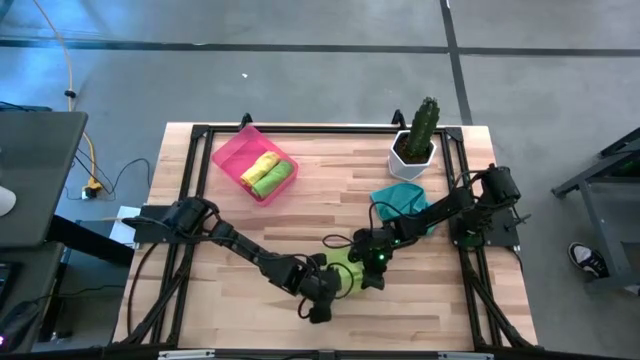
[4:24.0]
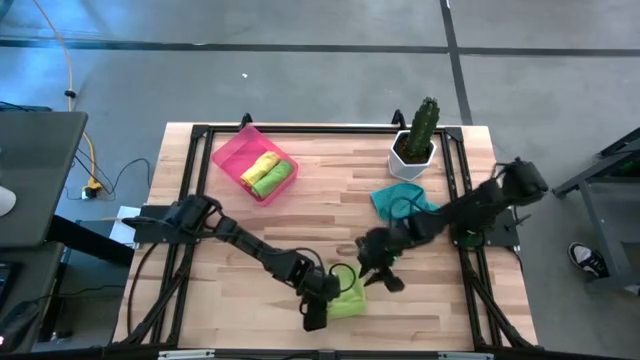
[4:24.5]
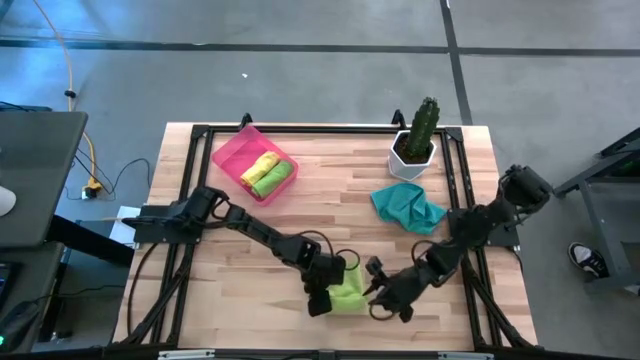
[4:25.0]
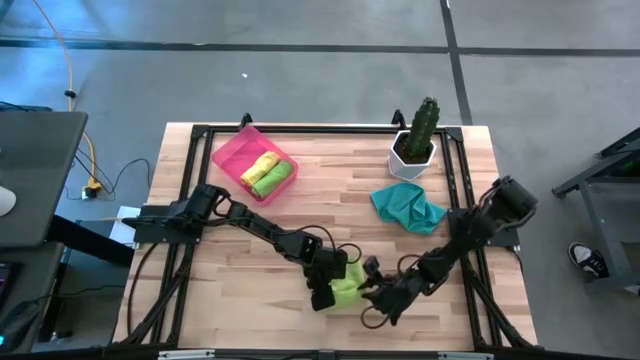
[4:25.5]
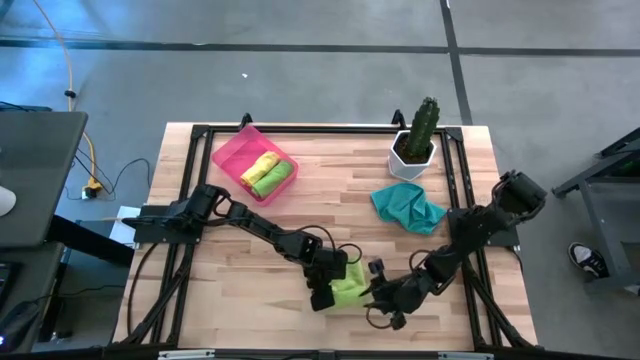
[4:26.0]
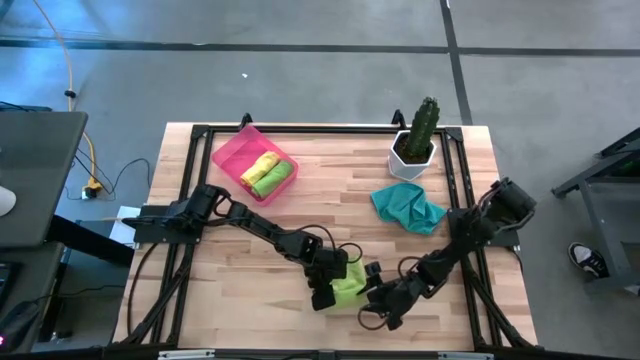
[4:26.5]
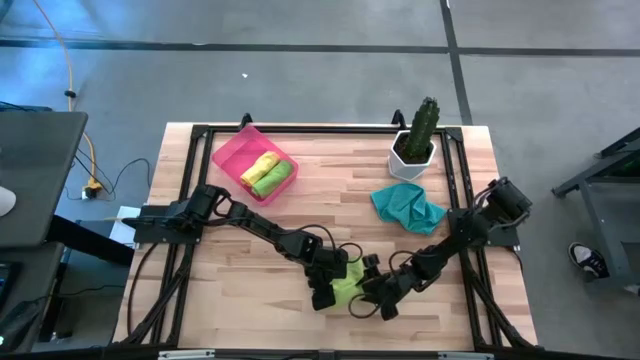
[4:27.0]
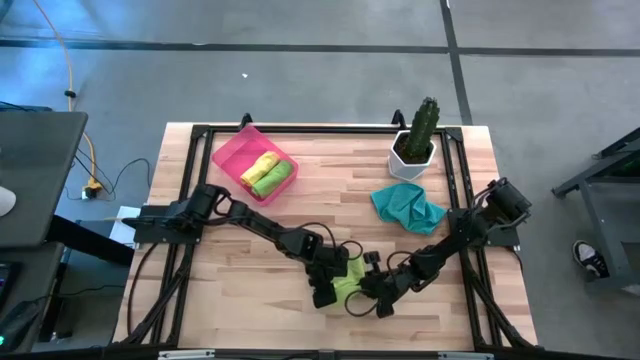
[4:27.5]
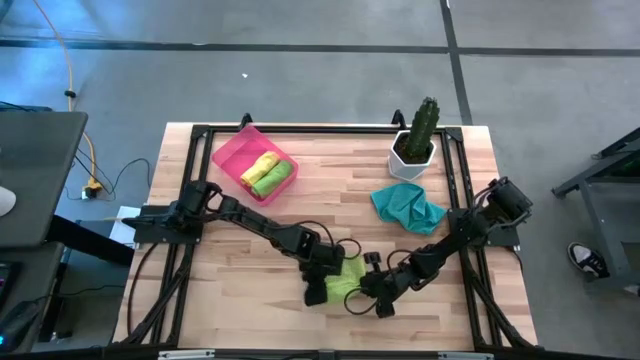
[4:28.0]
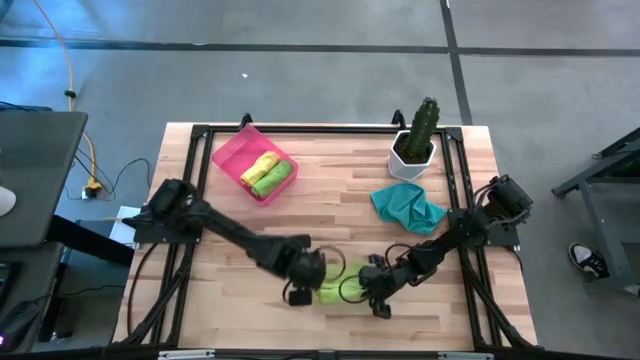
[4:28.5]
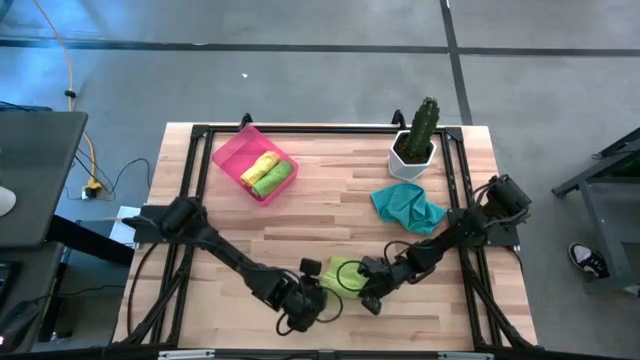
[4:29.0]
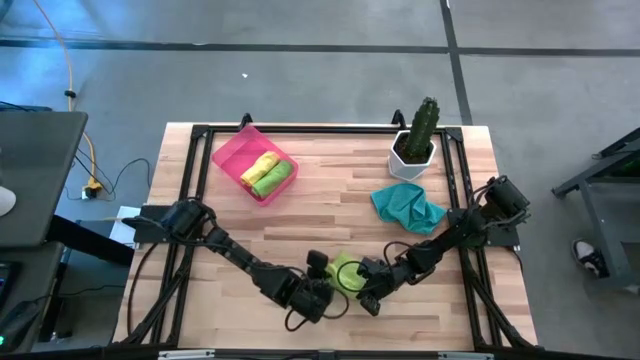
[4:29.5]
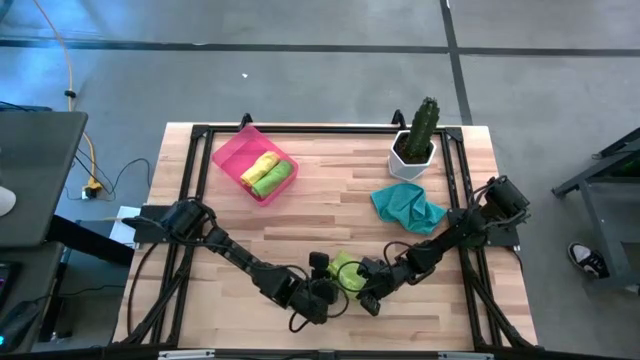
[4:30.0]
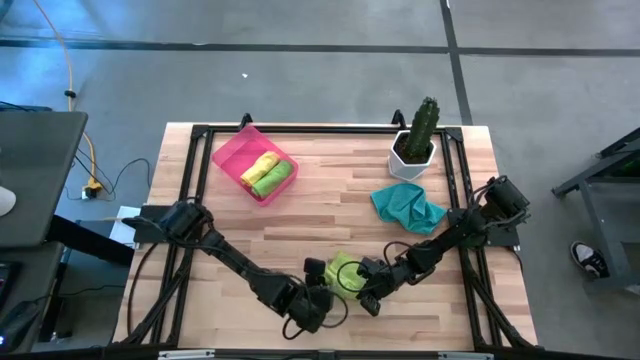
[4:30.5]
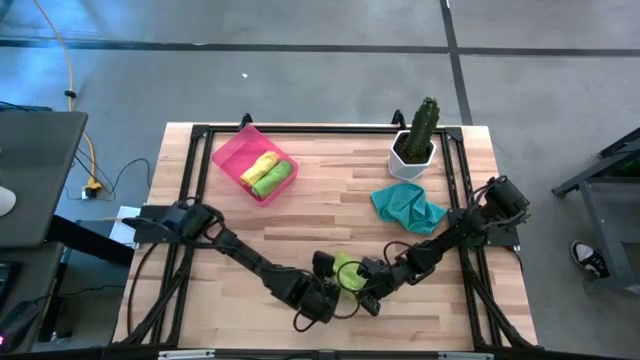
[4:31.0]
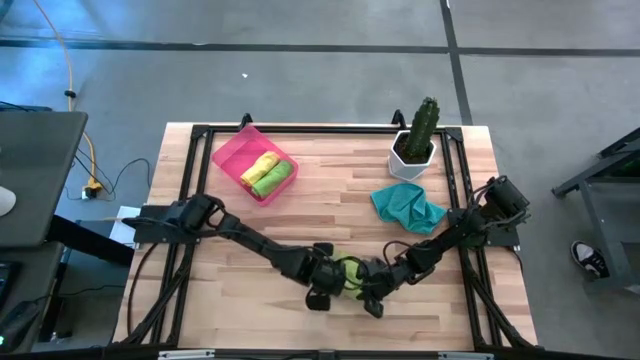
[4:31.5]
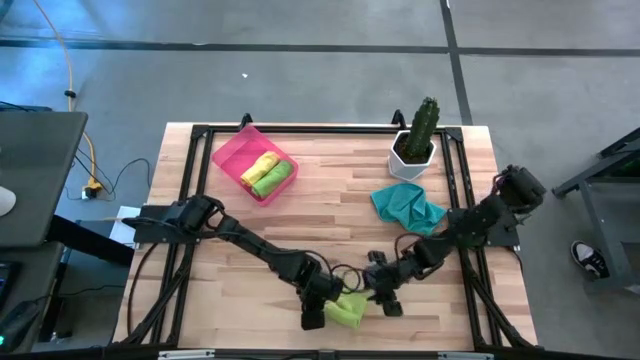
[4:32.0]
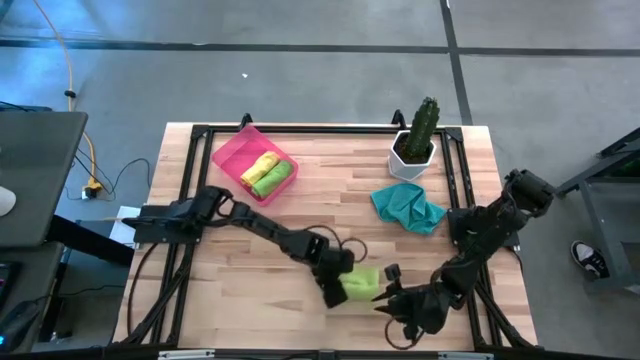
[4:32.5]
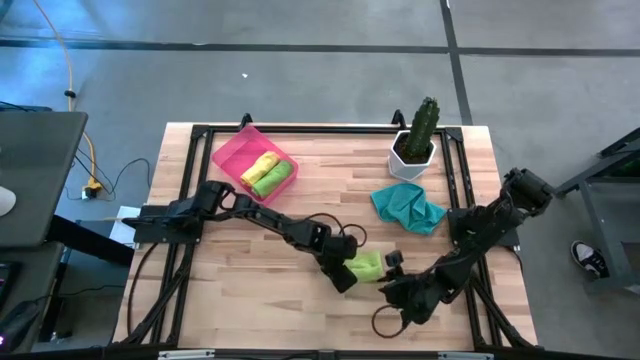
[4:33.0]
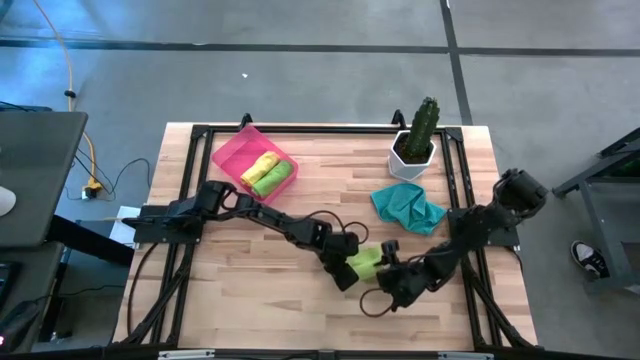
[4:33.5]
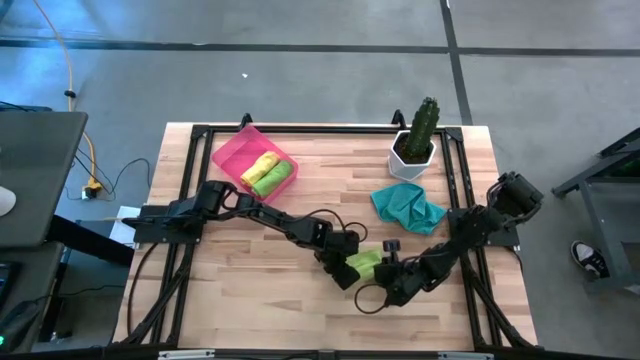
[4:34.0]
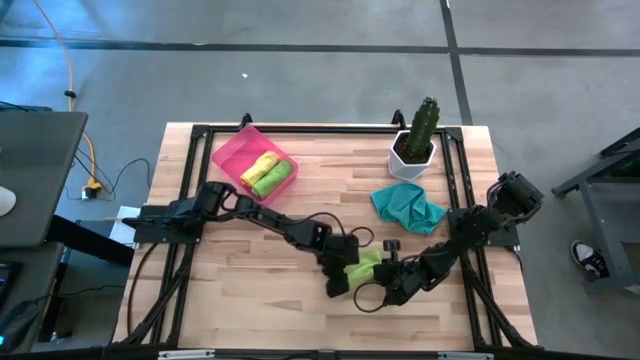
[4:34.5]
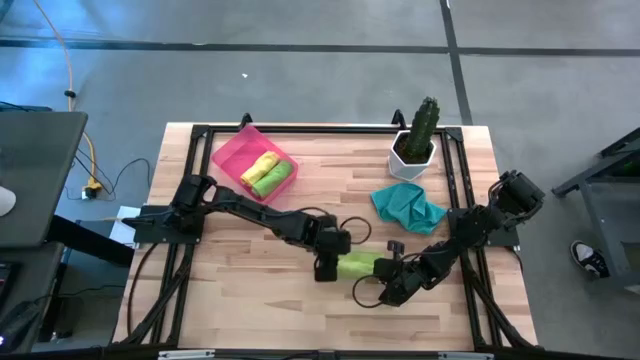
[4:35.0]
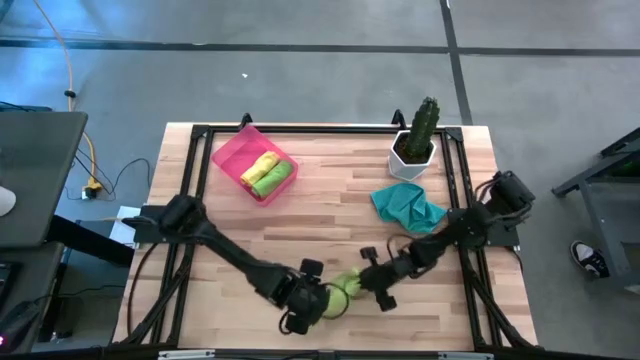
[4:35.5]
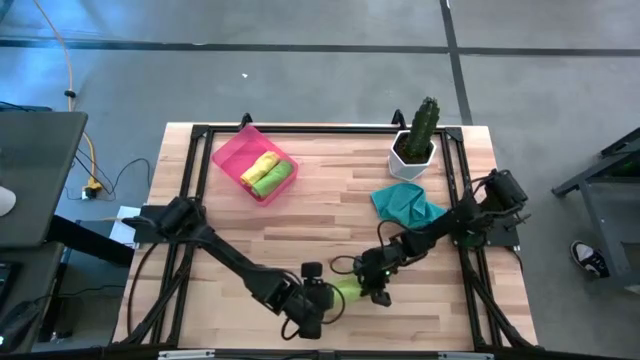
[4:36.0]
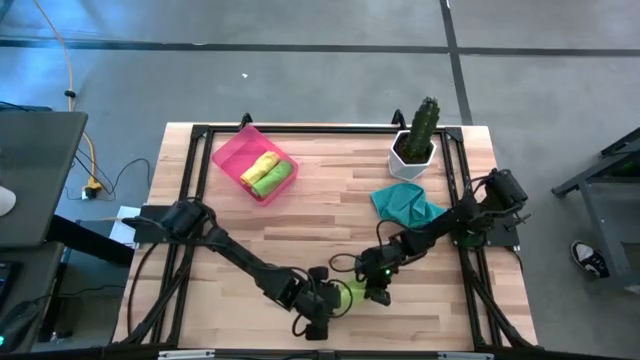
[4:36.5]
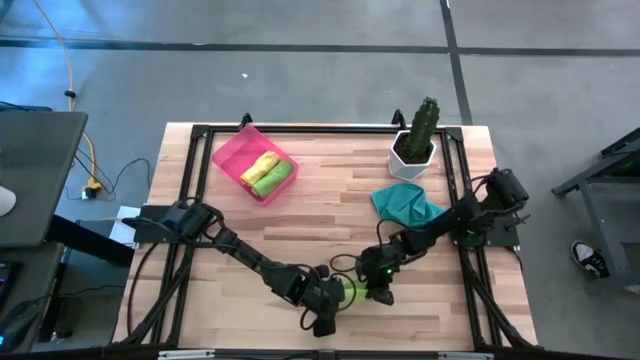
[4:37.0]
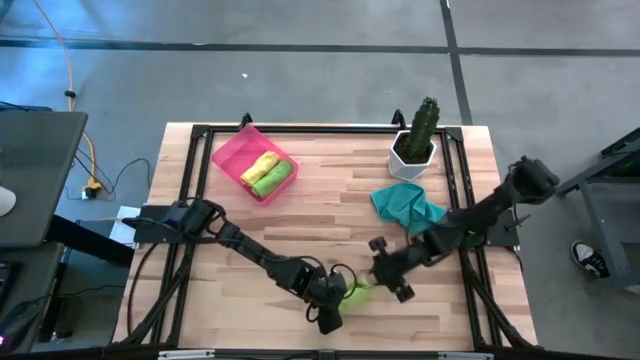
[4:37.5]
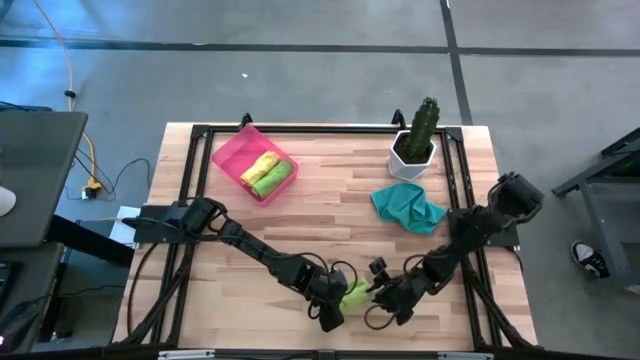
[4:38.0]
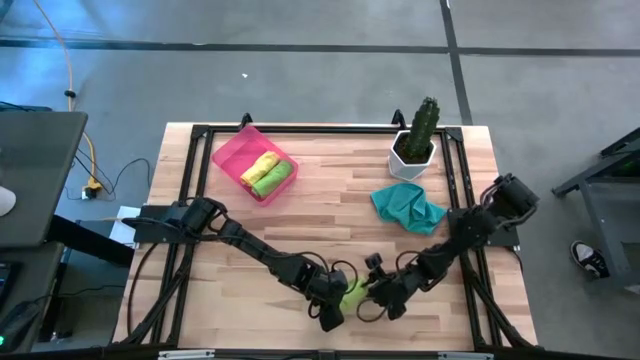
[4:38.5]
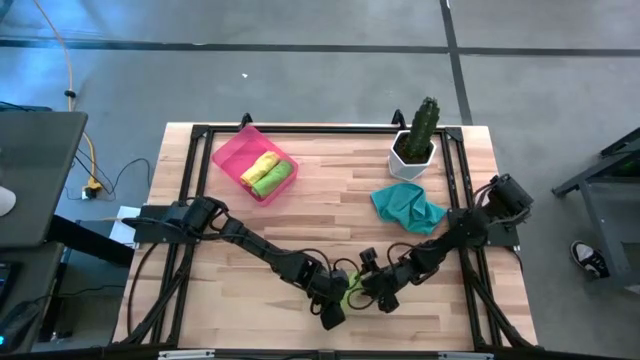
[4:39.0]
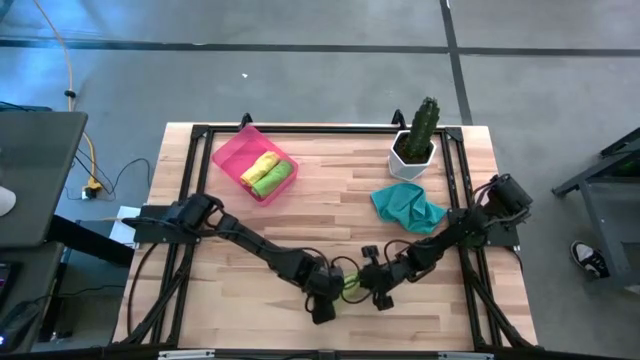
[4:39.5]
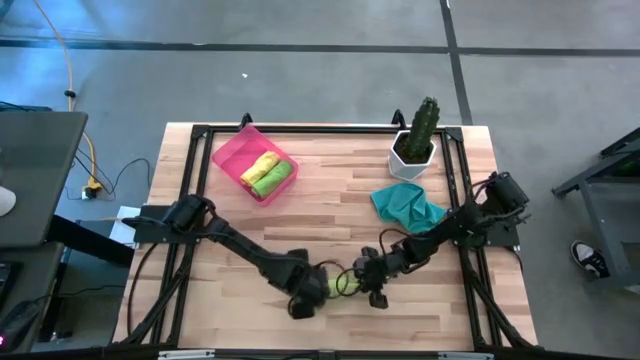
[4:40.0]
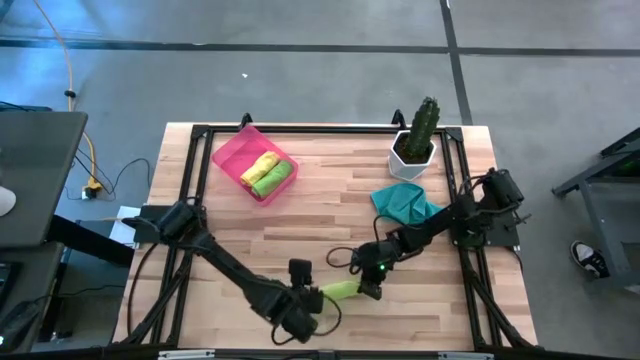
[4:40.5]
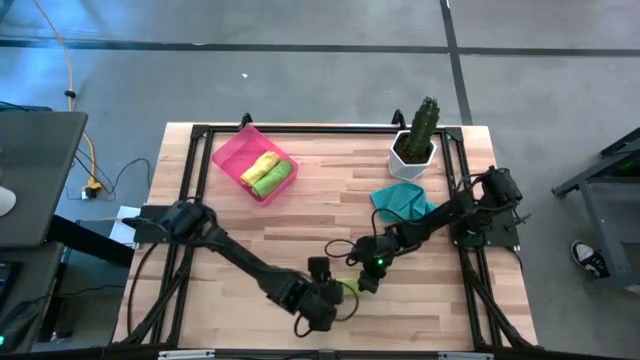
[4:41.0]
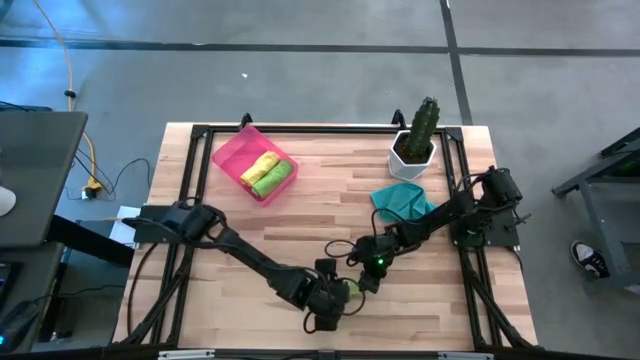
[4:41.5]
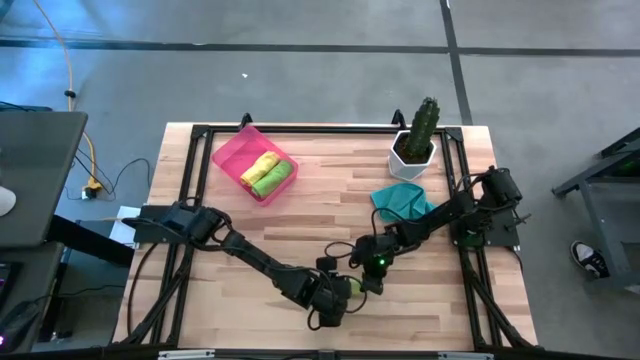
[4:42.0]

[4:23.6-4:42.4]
Task: Roll microfiber towels into tight, uniform cylinder then place into a basket
Roll the light green microfiber cloth

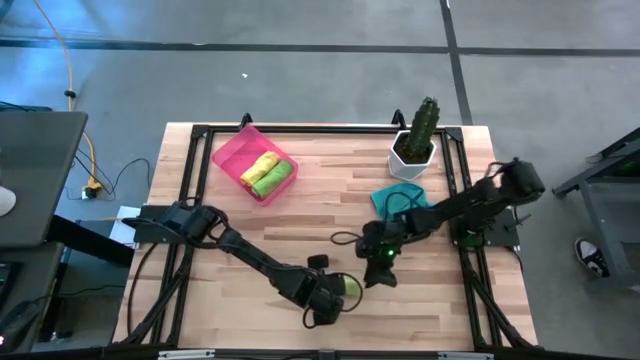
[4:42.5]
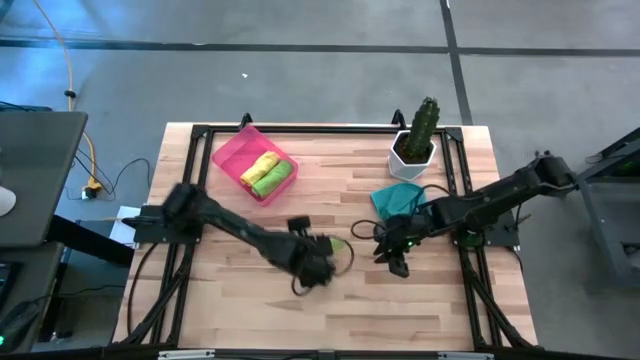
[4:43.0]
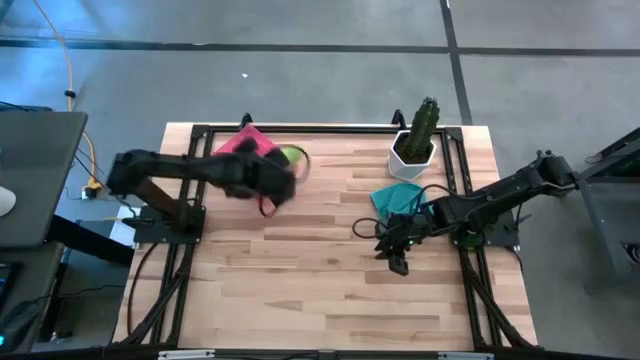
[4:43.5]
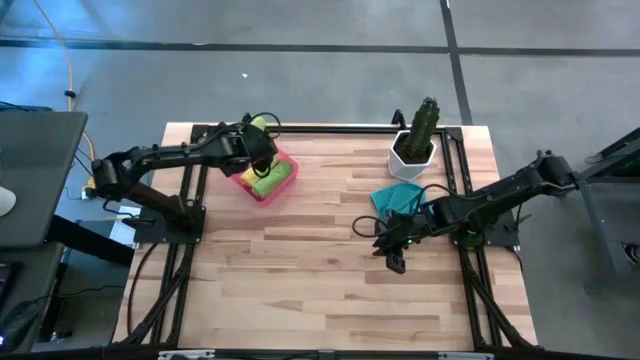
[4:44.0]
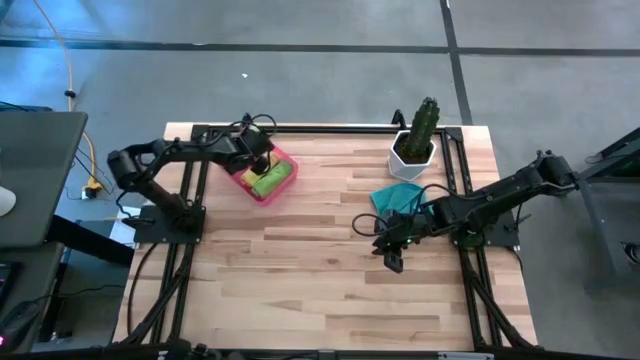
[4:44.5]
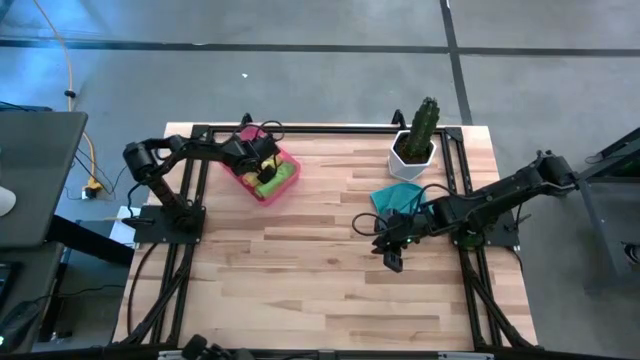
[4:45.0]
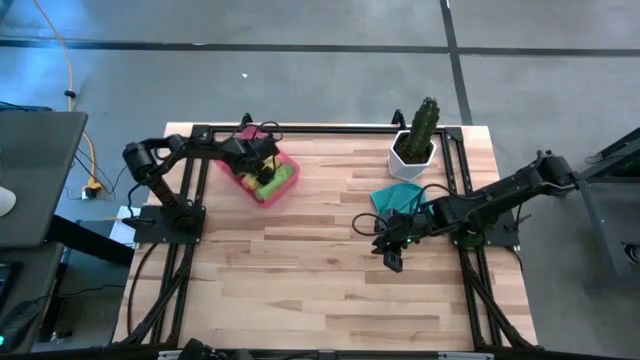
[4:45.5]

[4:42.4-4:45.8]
Put the rolled light green microfiber cloth into the pink bin

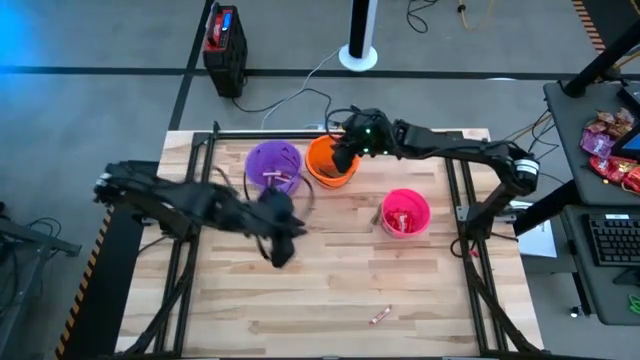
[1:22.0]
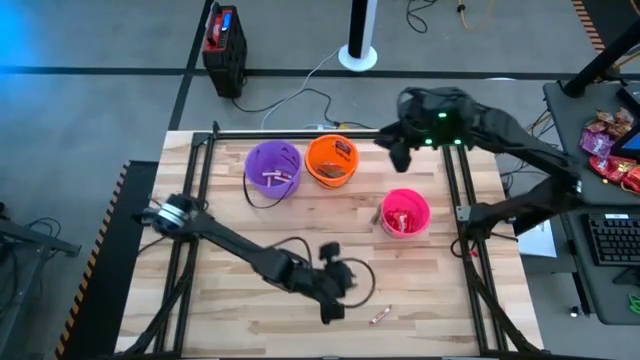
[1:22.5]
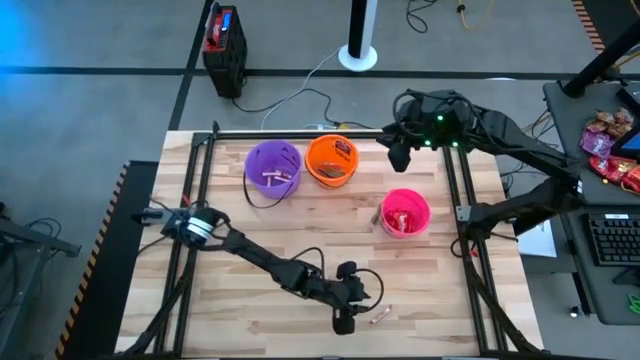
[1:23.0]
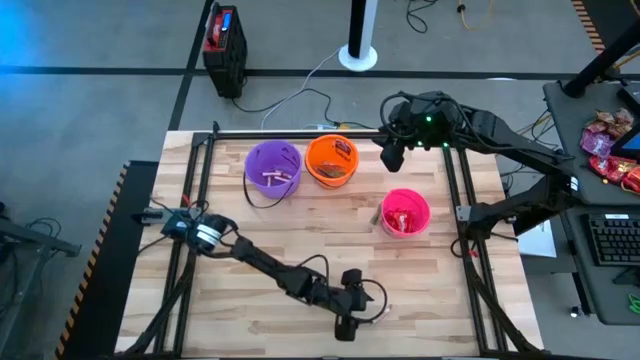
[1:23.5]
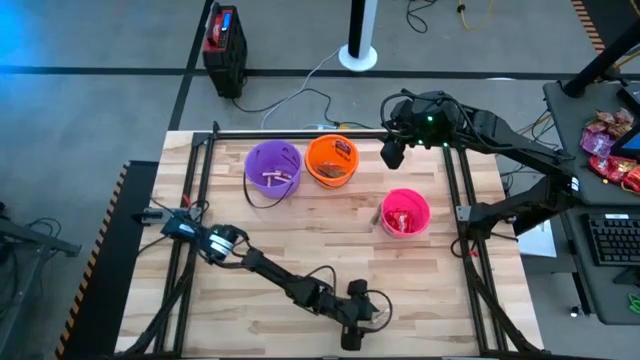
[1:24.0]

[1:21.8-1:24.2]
Task: Sort candy by brand, put in halloween buckets
Put the white candy into the violet bucket
